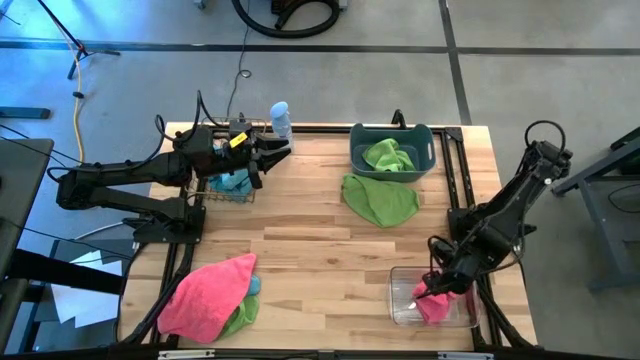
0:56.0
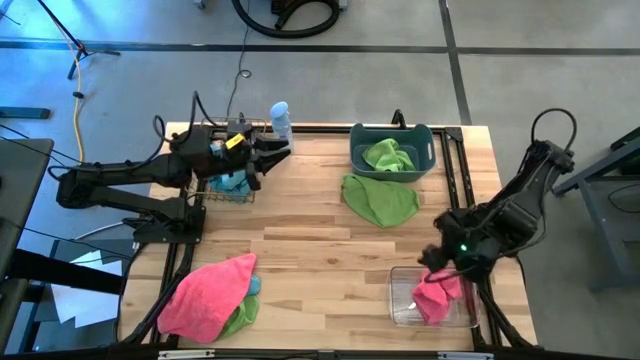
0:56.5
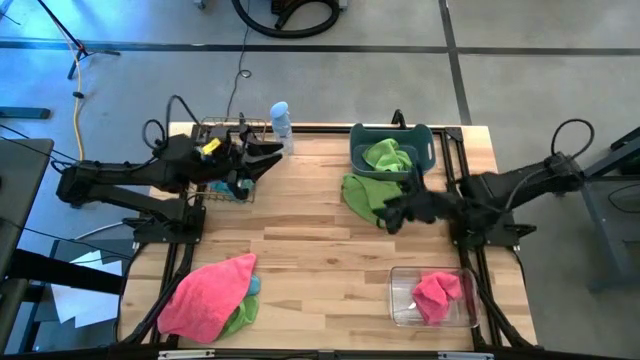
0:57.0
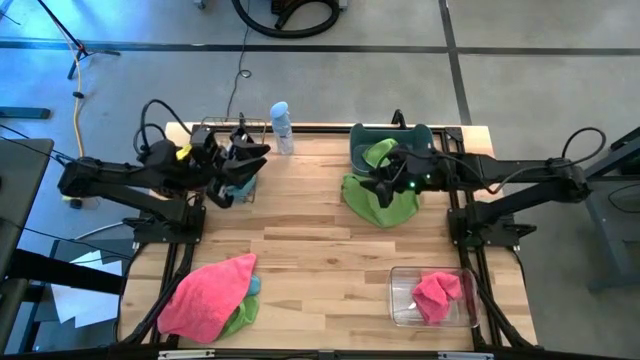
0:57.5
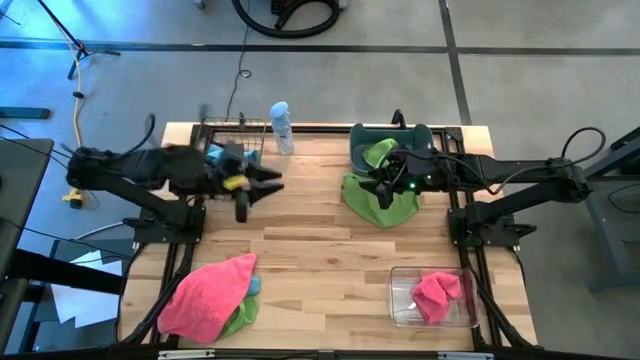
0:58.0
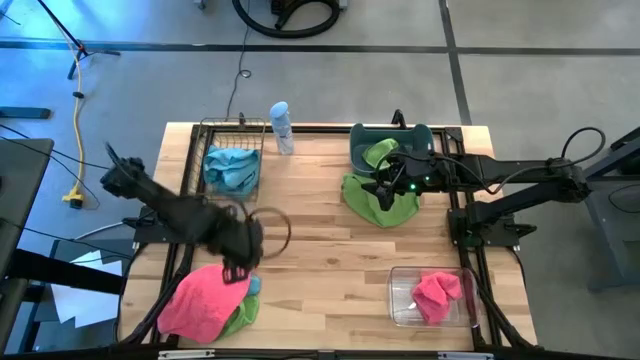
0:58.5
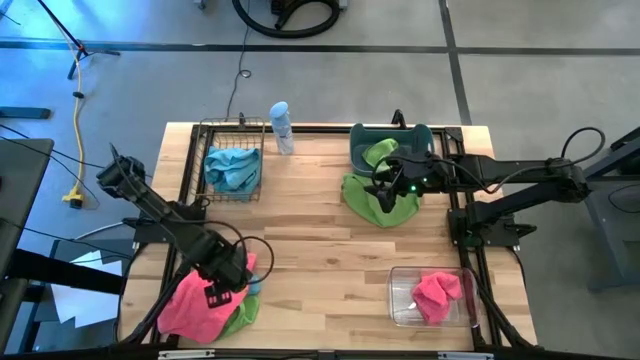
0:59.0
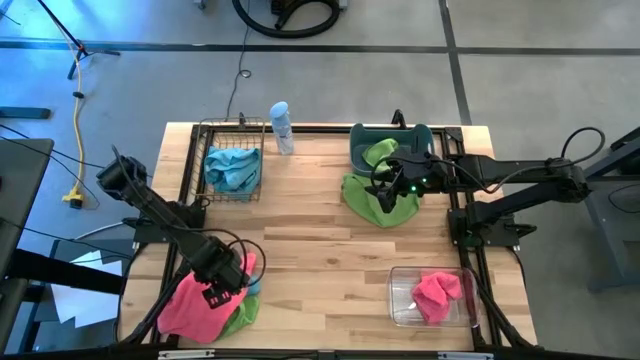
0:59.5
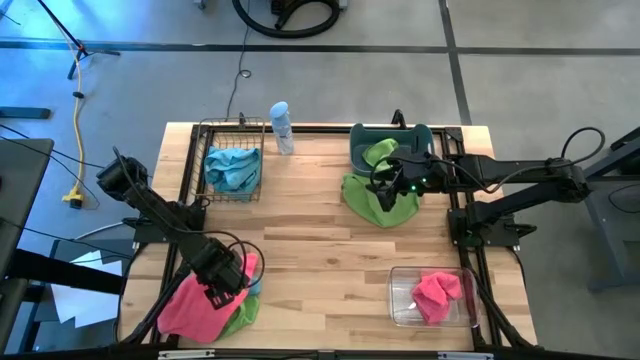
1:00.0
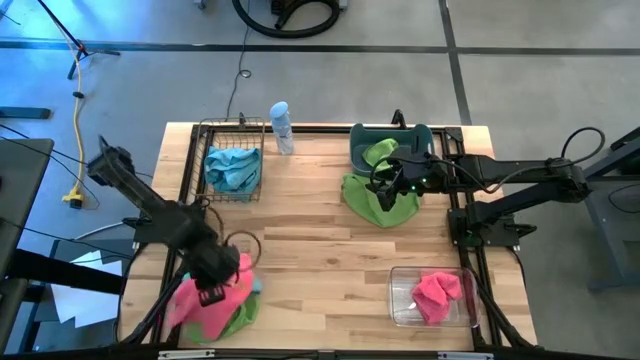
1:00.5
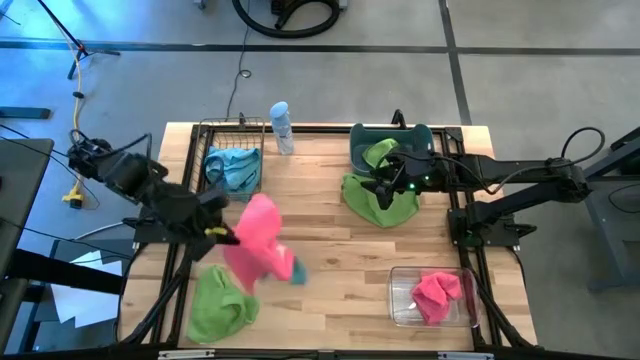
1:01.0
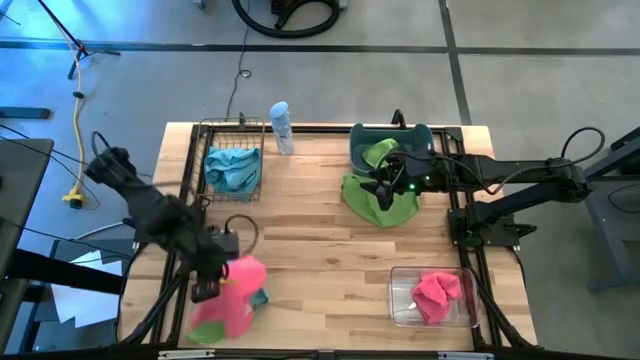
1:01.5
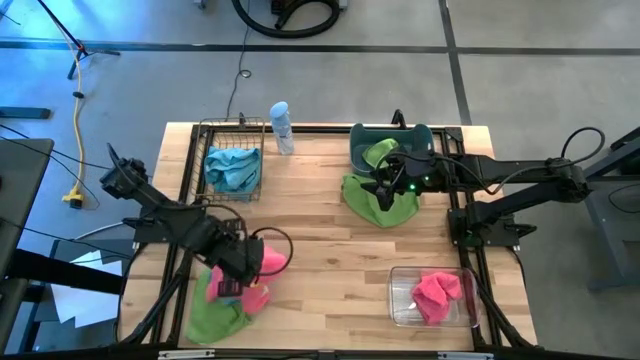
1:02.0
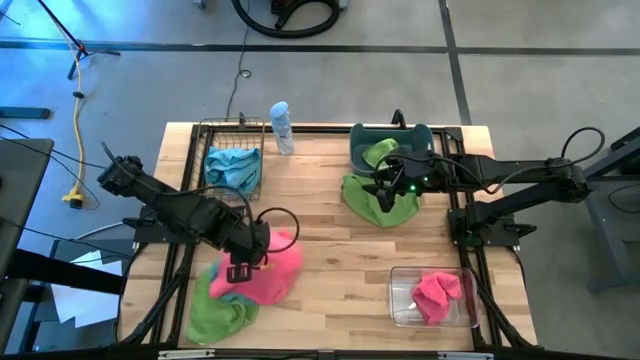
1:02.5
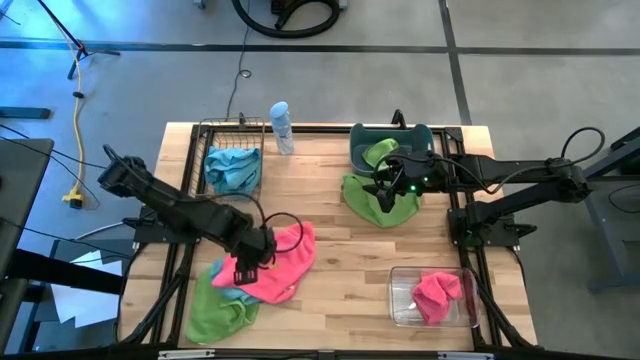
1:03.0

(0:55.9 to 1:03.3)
Task: Sort microfiber towel by color & place in baskets
Put the pink towel into the transparent bin

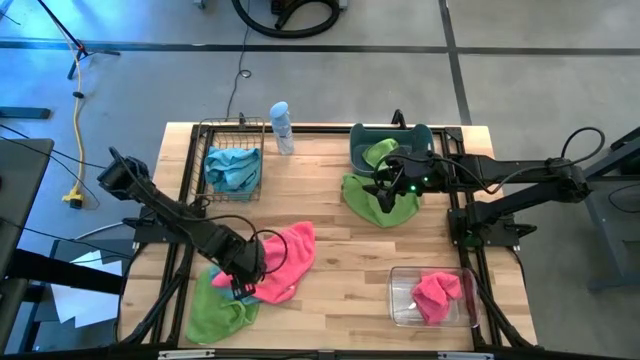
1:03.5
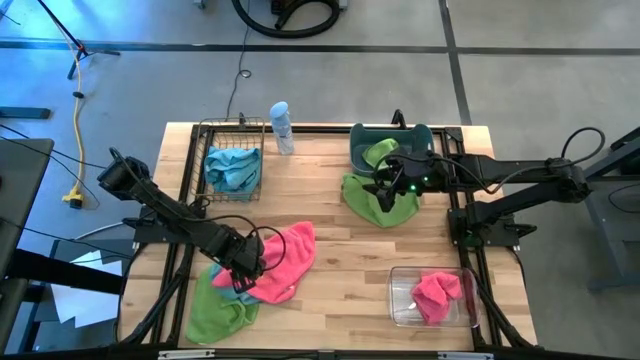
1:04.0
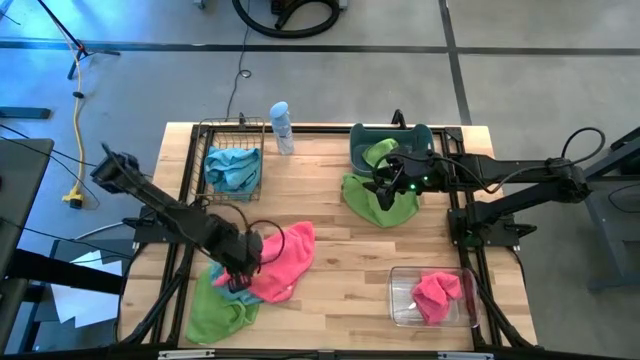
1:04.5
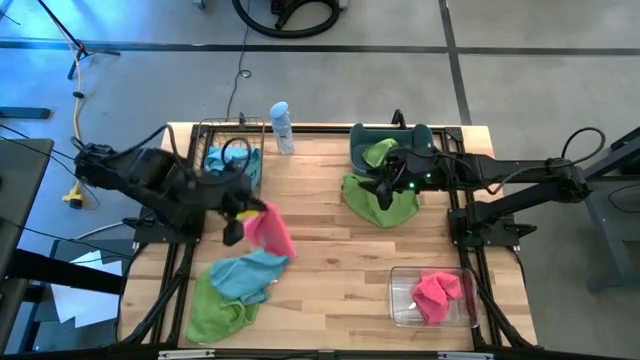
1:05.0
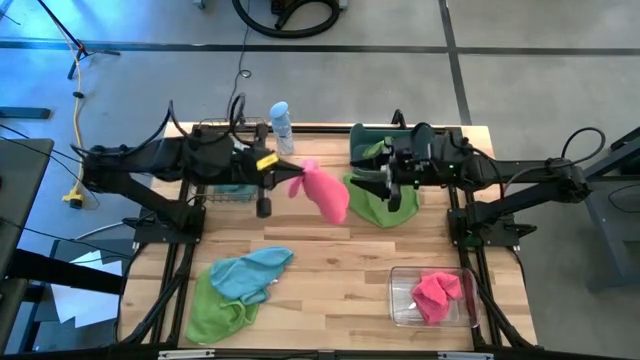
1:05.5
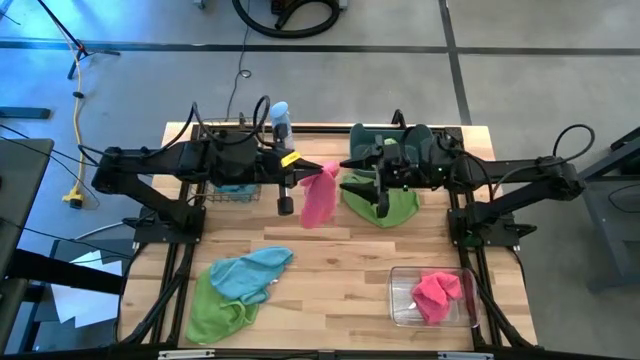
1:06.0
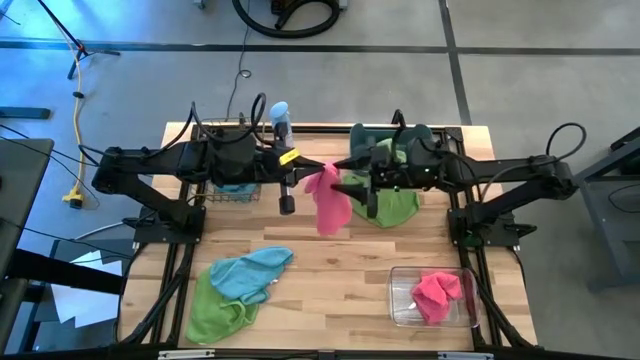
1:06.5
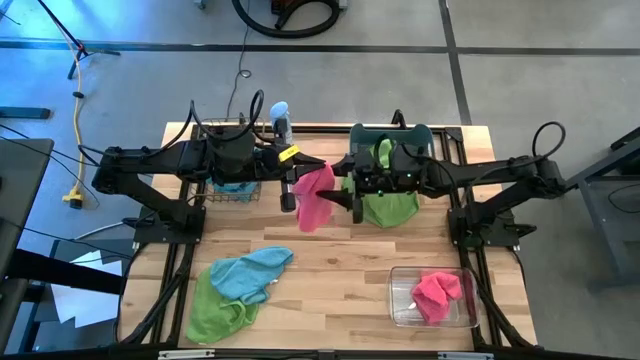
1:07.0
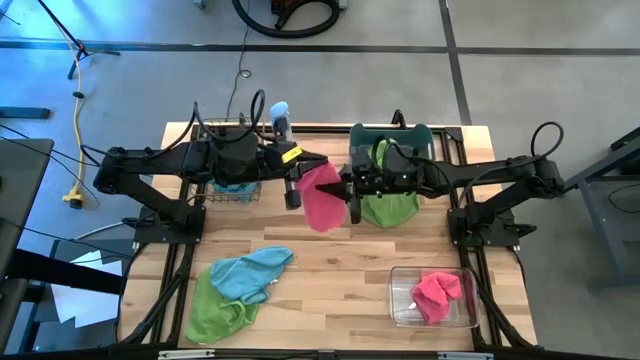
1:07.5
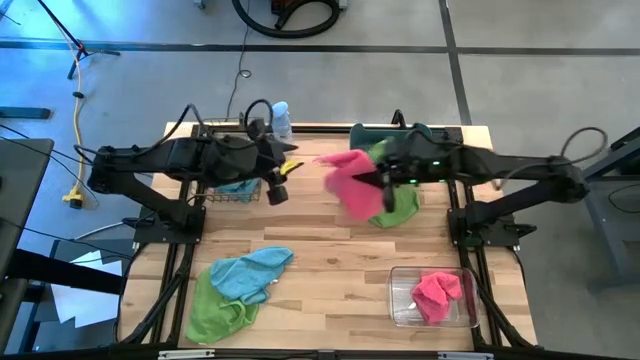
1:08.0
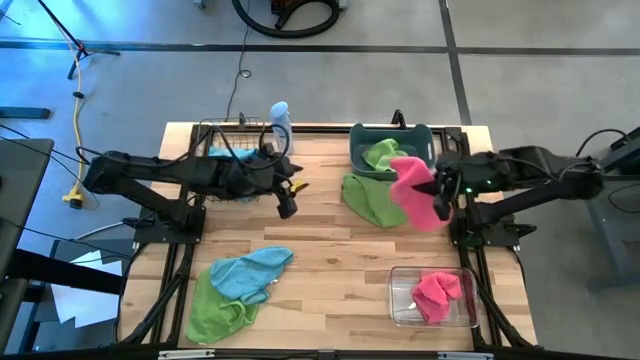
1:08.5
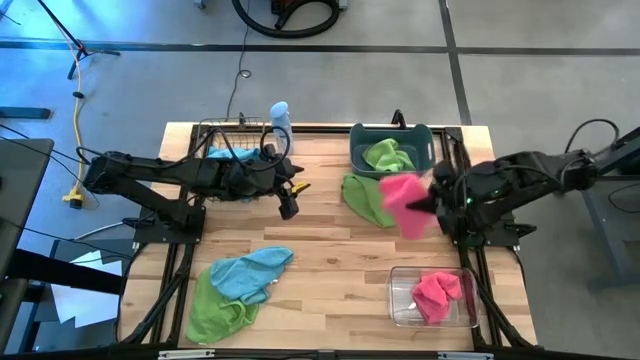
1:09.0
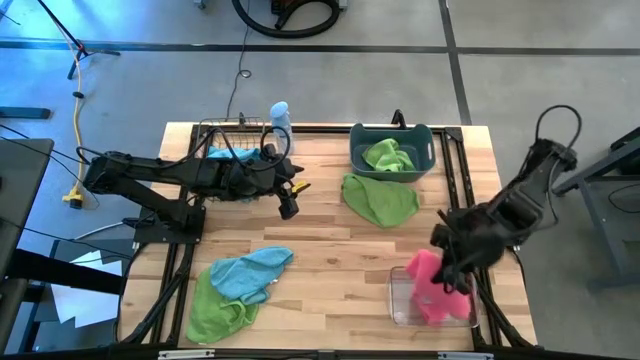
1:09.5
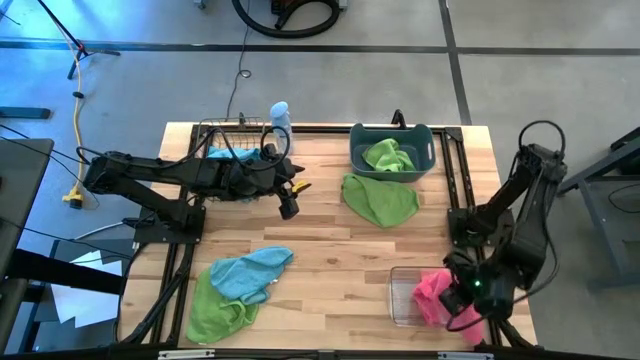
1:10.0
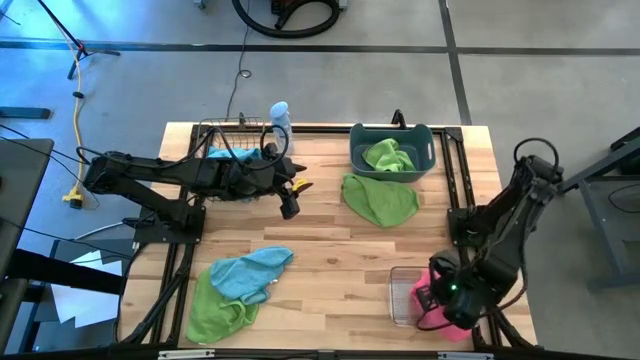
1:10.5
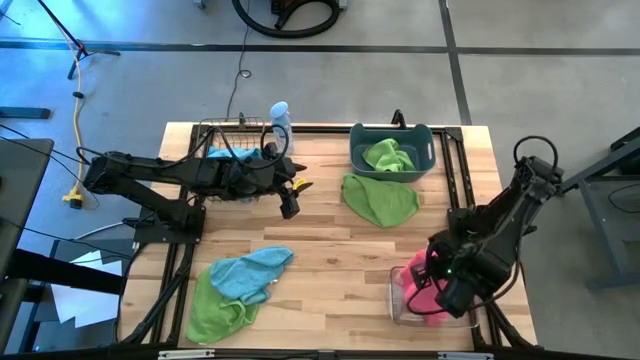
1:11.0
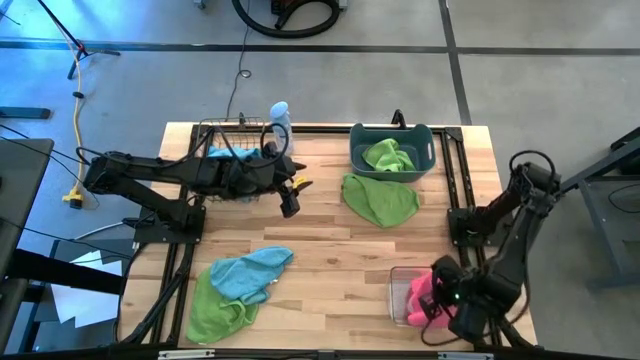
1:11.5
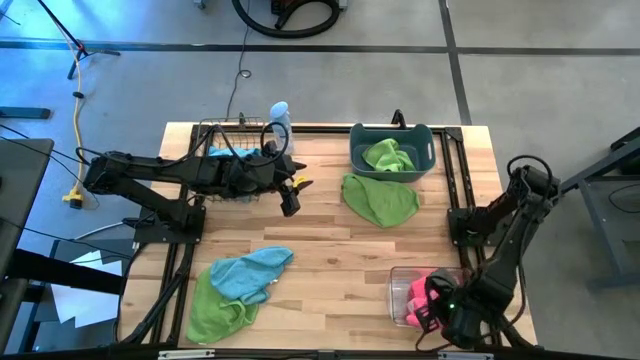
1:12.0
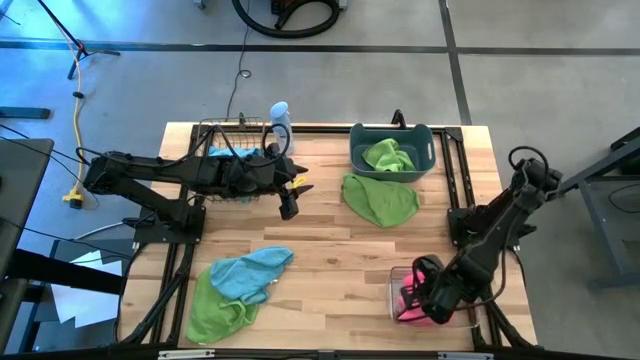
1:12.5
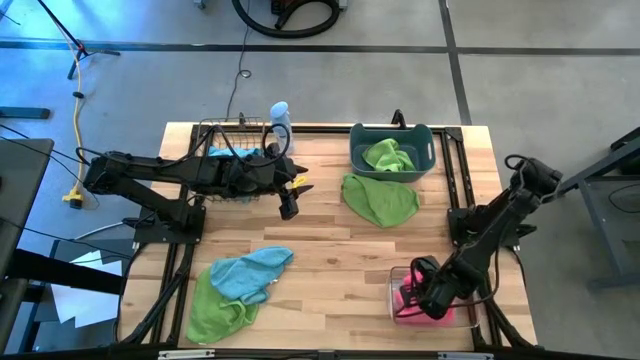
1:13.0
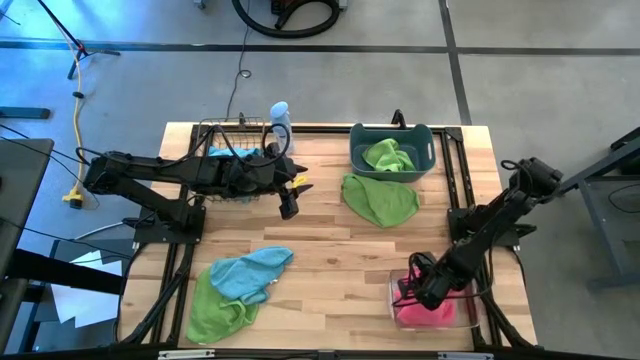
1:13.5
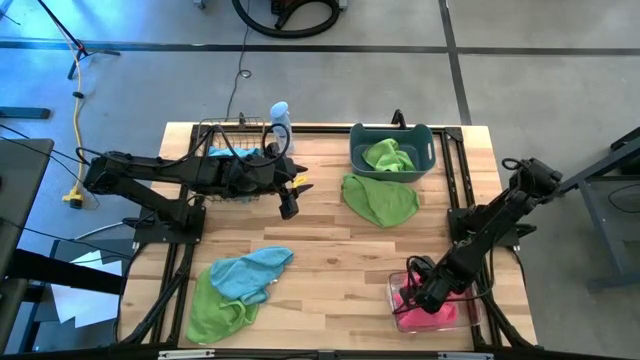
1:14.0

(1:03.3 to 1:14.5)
Put the pink towel into the transparent bin

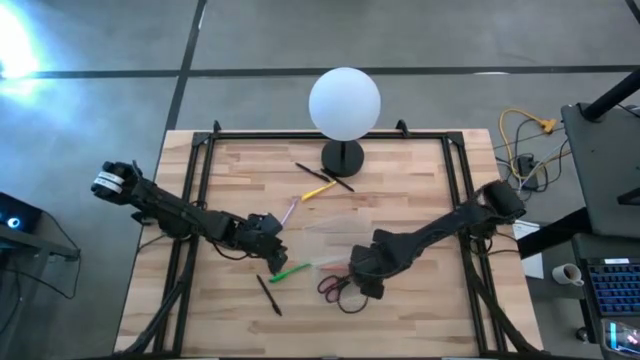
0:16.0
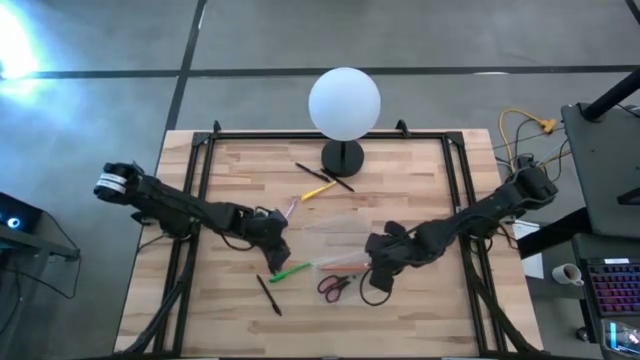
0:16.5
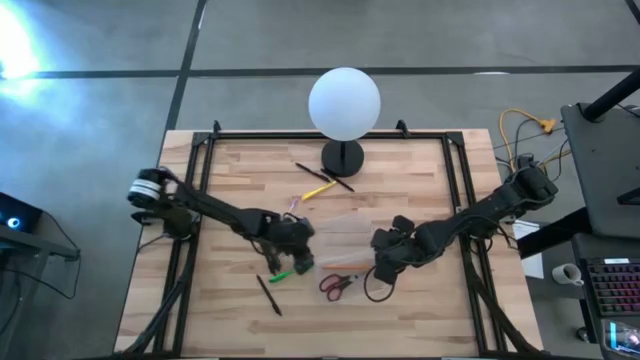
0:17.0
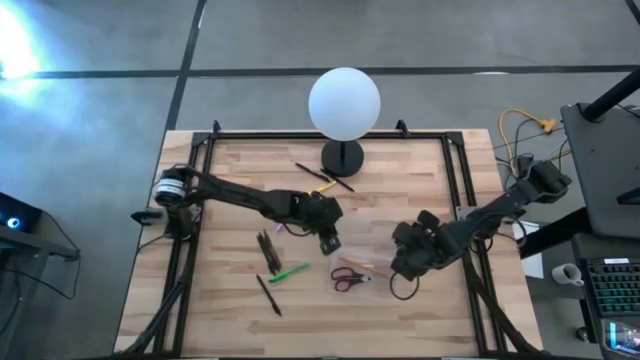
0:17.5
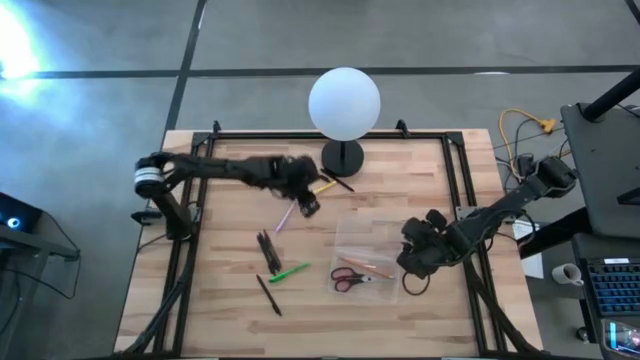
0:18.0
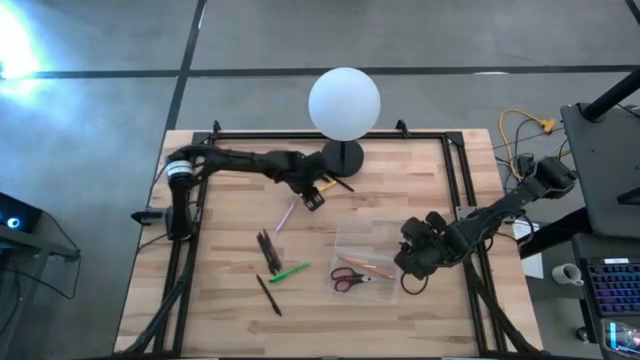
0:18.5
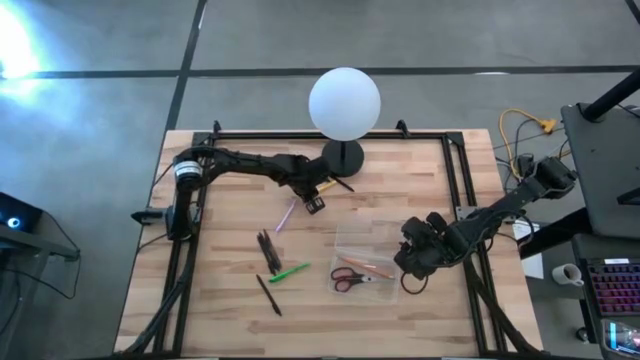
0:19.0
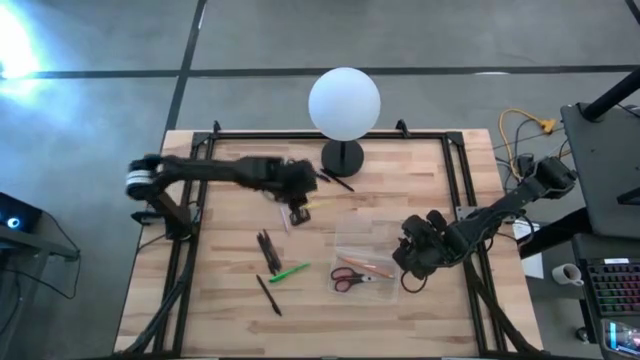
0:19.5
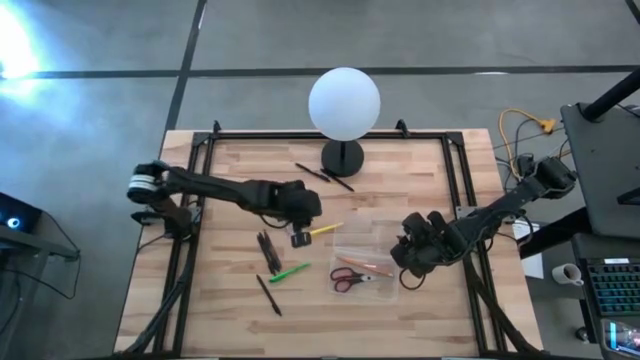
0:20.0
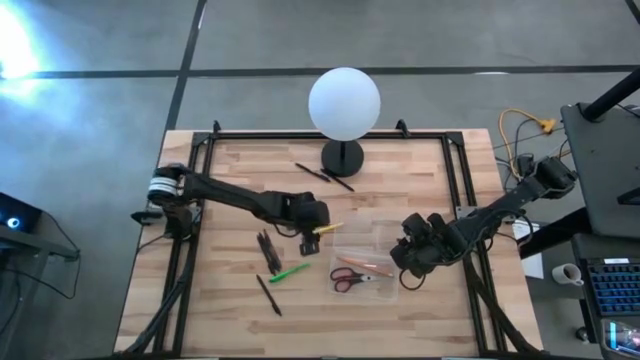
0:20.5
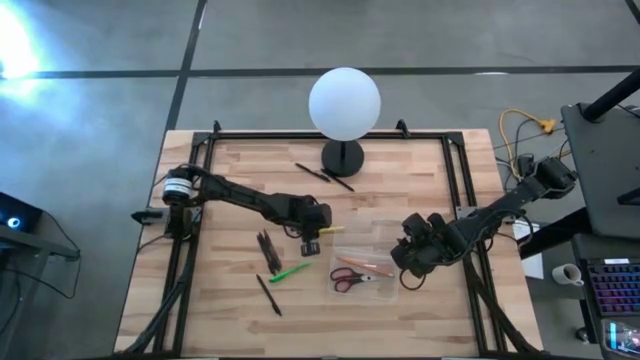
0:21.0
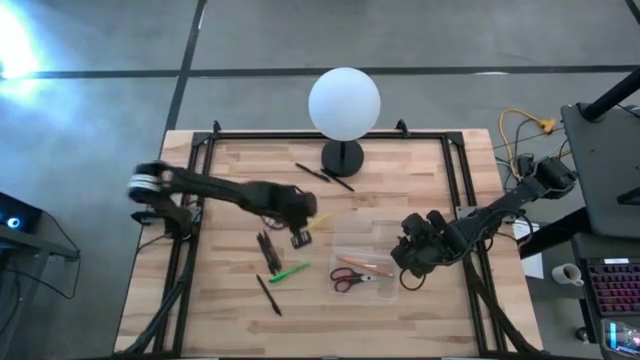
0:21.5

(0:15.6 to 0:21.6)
Task: Pick & place school supplies into a supply box
Put the yellow pen into the transparent supply box
